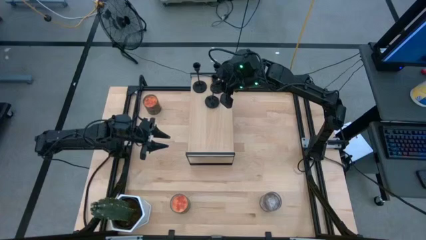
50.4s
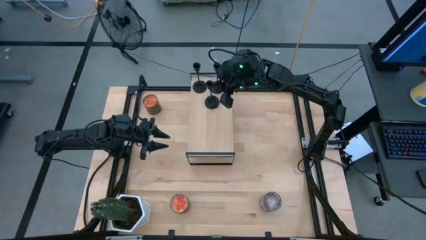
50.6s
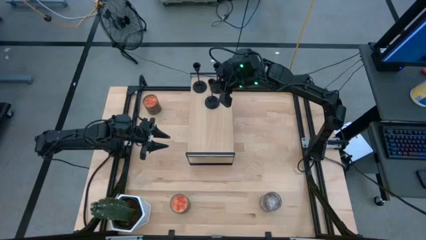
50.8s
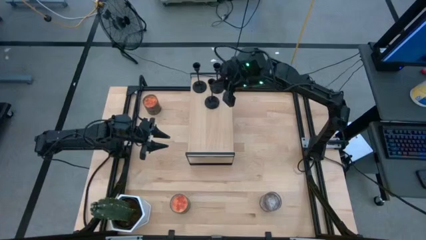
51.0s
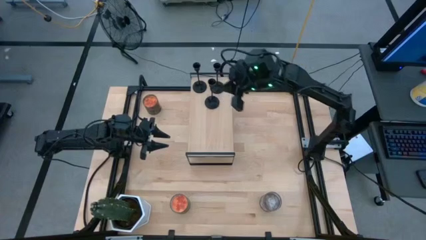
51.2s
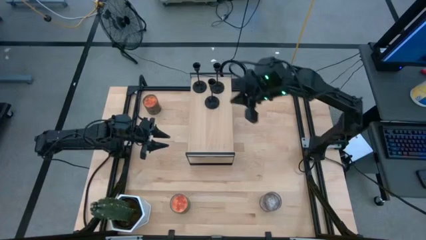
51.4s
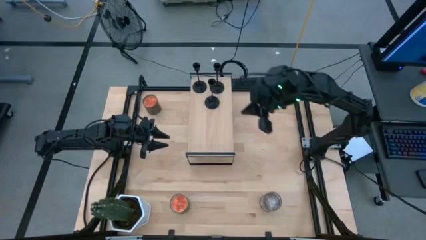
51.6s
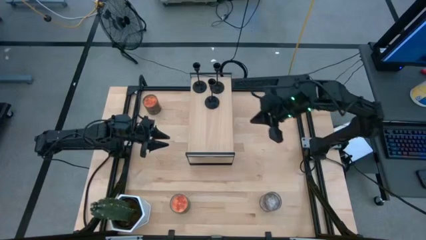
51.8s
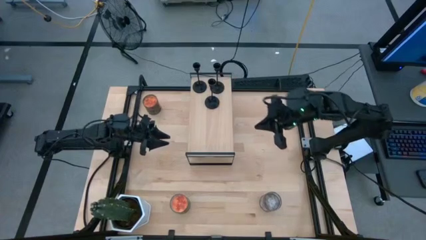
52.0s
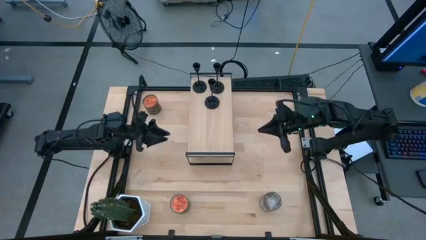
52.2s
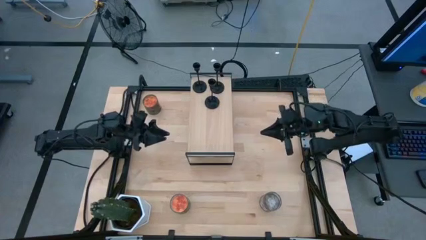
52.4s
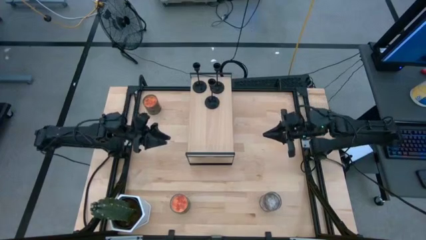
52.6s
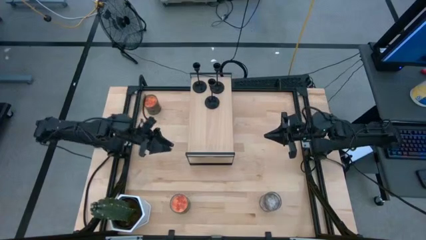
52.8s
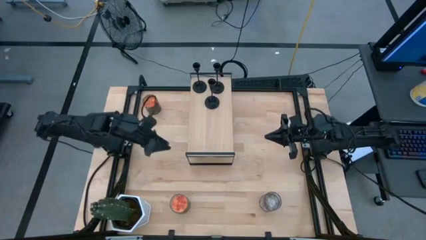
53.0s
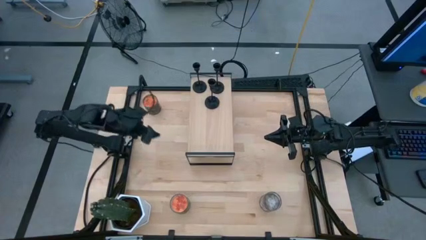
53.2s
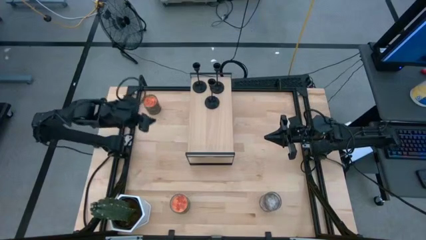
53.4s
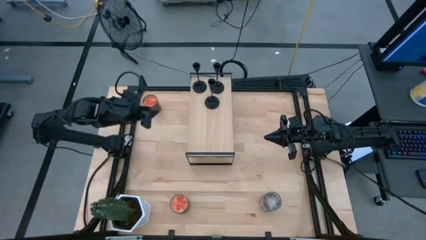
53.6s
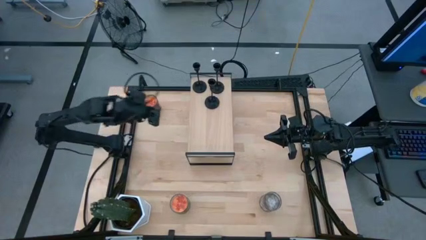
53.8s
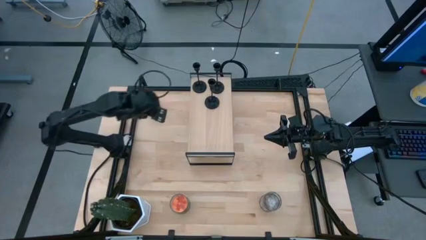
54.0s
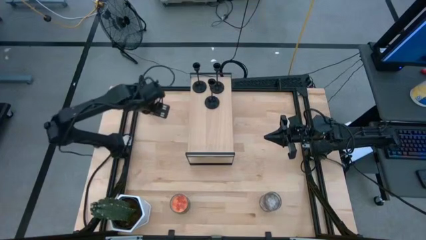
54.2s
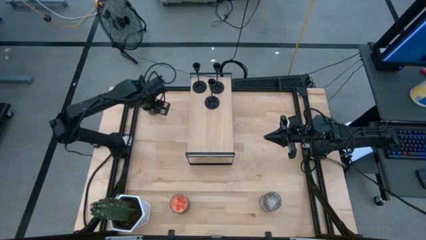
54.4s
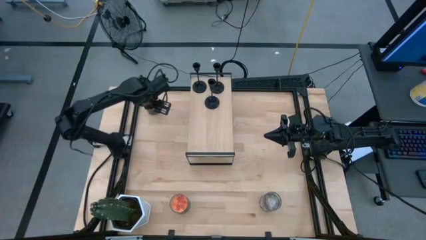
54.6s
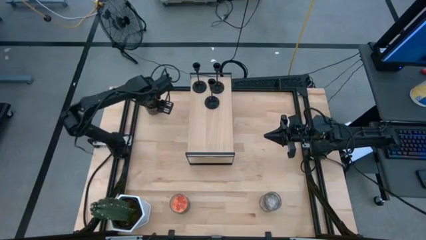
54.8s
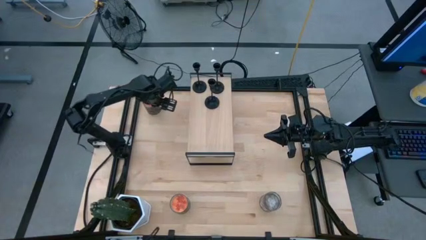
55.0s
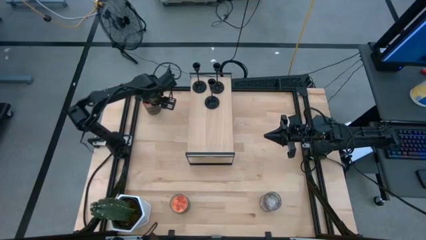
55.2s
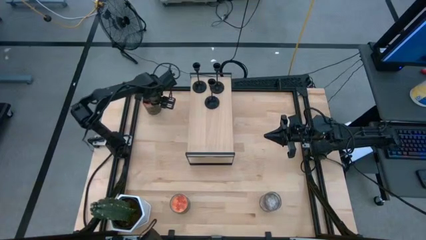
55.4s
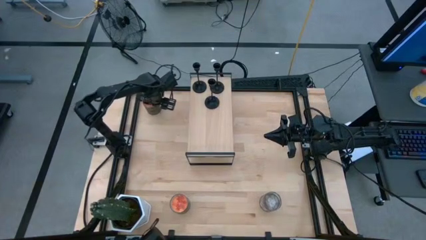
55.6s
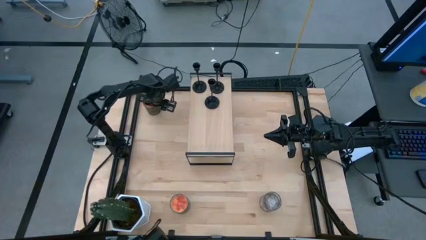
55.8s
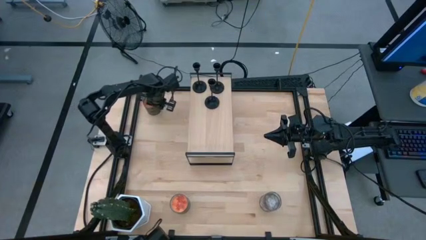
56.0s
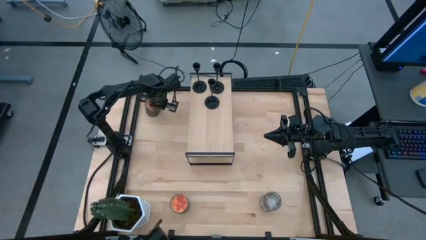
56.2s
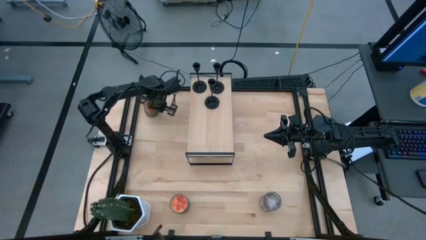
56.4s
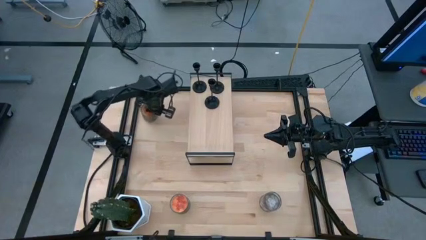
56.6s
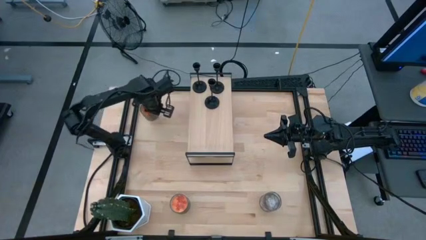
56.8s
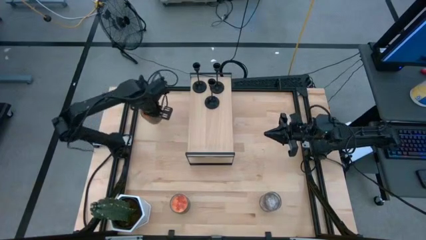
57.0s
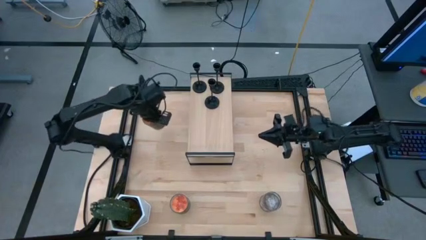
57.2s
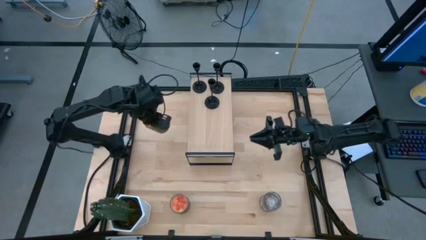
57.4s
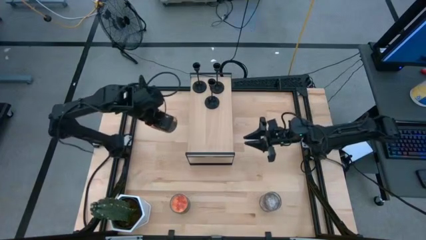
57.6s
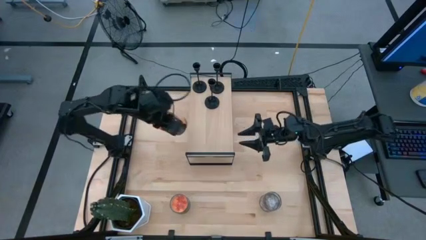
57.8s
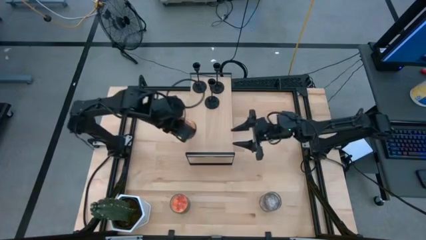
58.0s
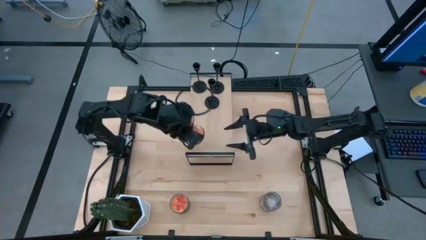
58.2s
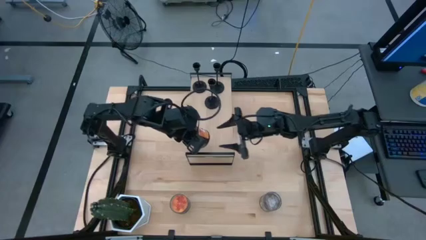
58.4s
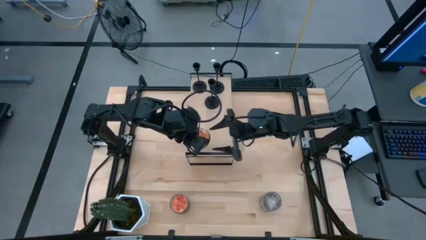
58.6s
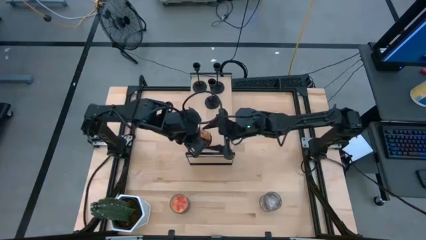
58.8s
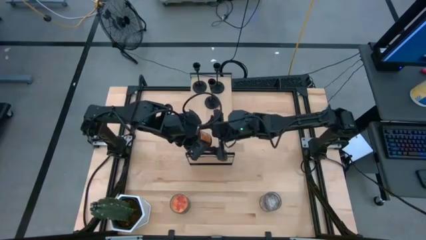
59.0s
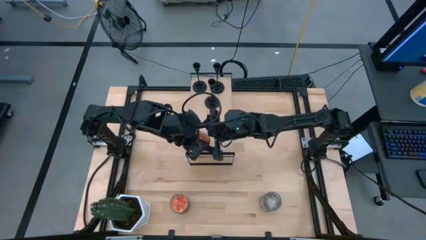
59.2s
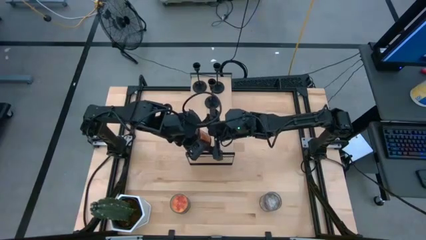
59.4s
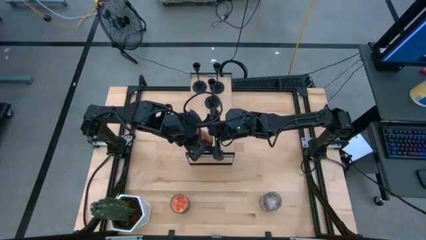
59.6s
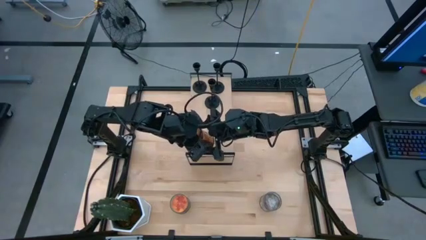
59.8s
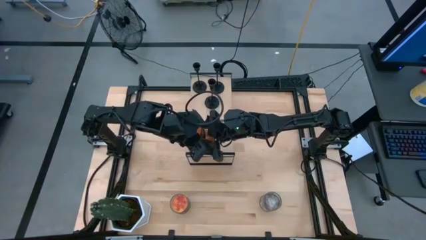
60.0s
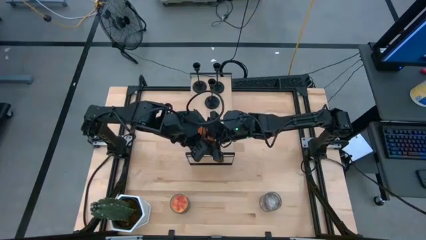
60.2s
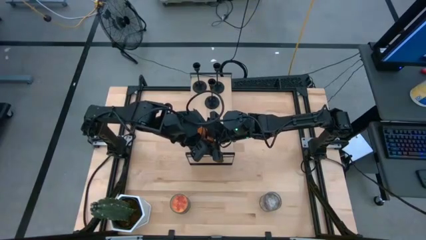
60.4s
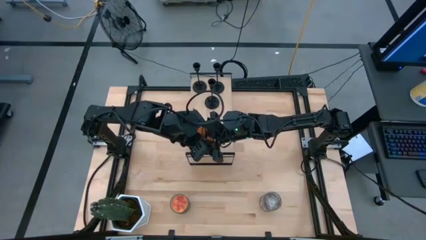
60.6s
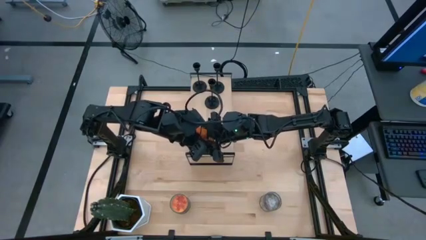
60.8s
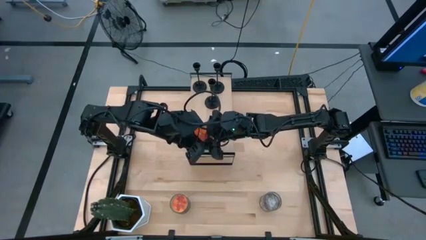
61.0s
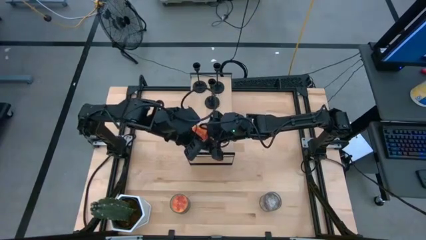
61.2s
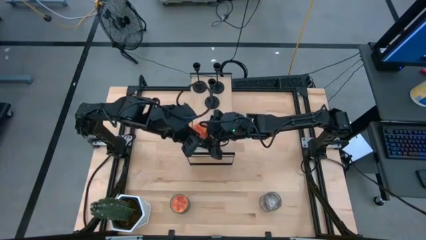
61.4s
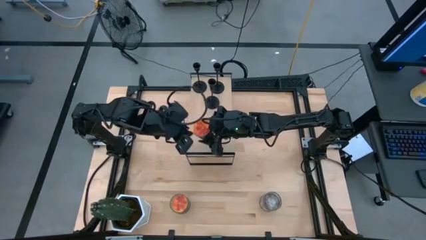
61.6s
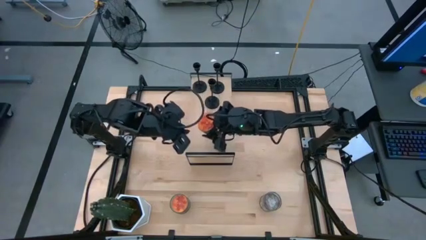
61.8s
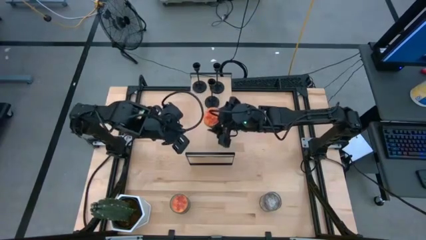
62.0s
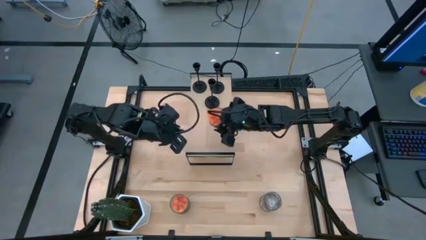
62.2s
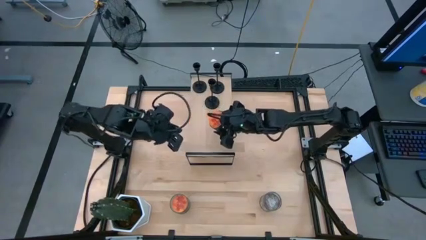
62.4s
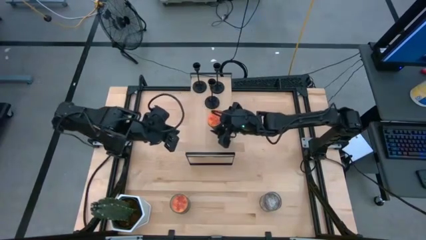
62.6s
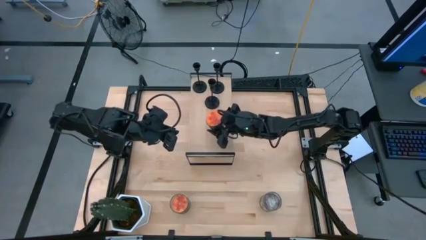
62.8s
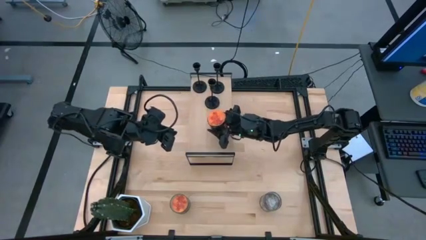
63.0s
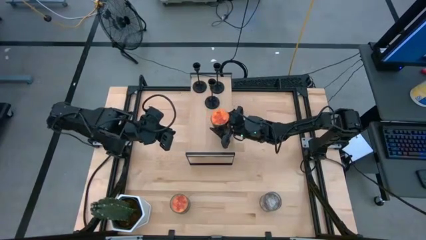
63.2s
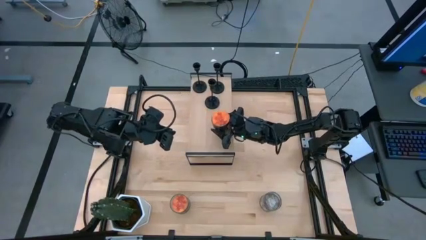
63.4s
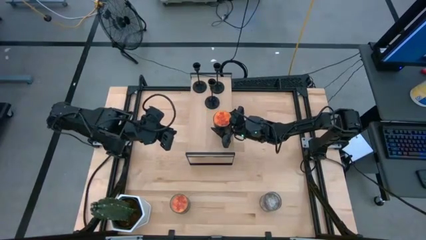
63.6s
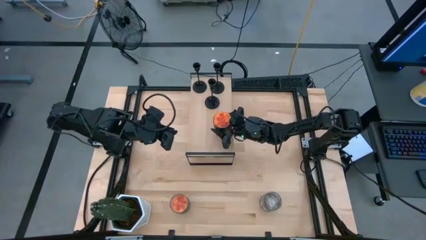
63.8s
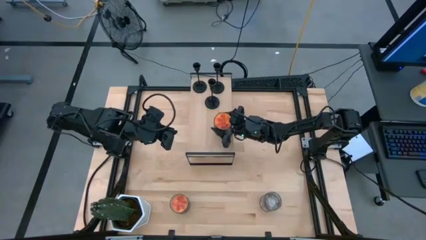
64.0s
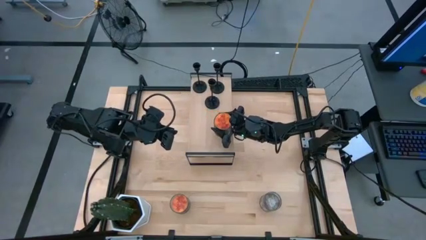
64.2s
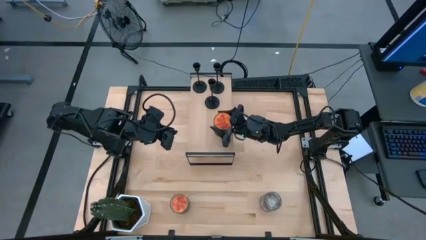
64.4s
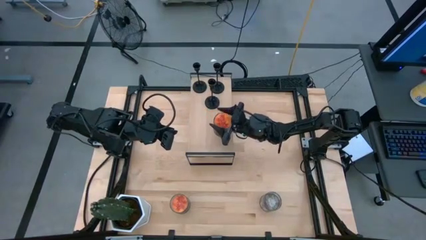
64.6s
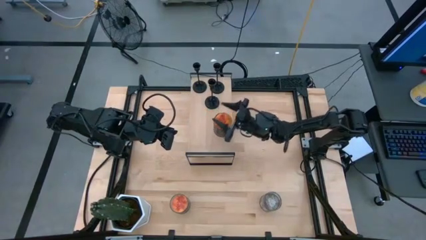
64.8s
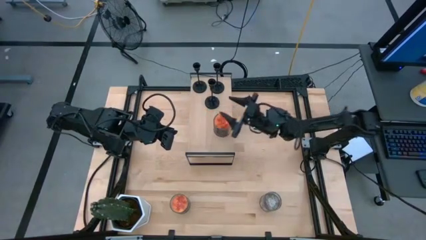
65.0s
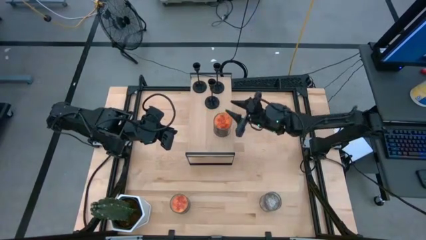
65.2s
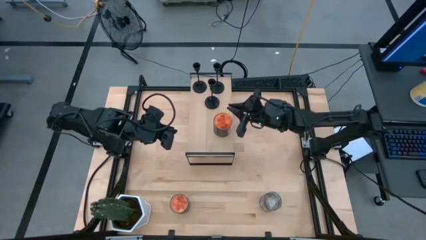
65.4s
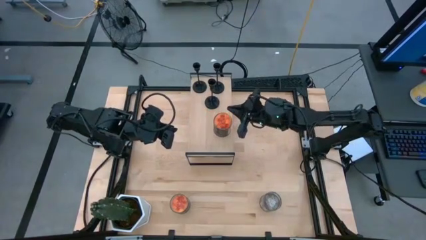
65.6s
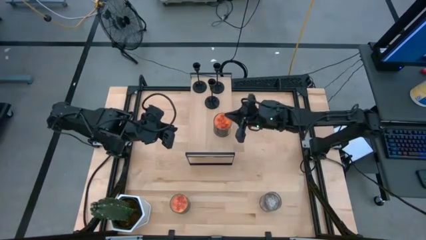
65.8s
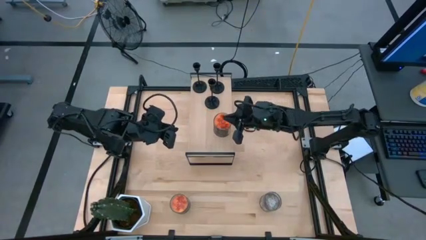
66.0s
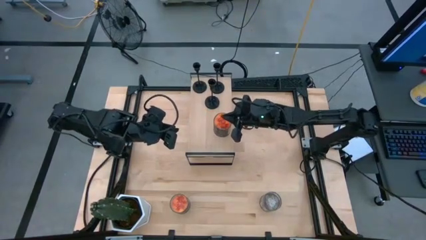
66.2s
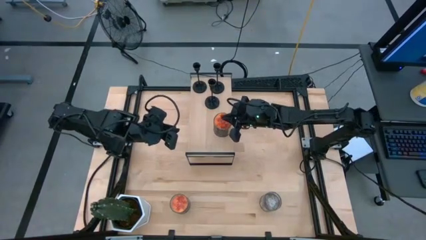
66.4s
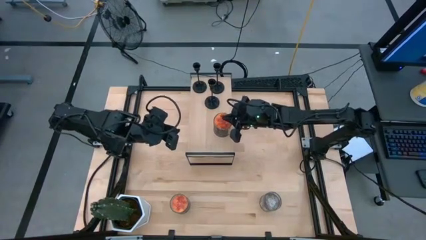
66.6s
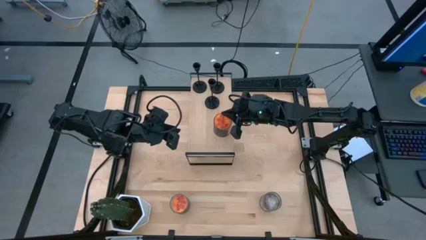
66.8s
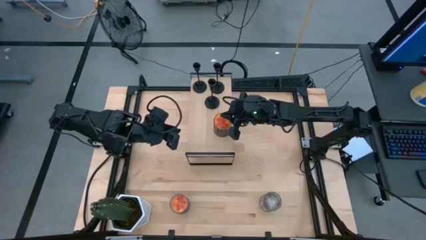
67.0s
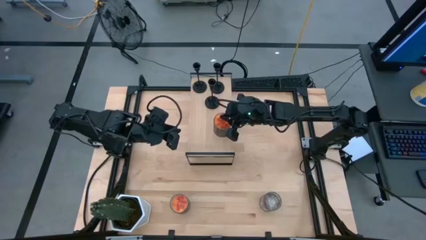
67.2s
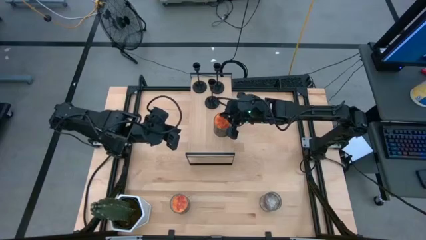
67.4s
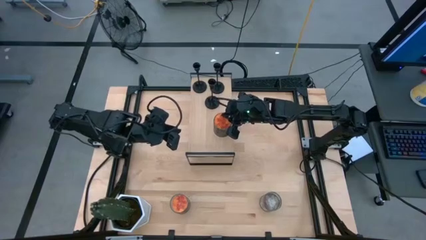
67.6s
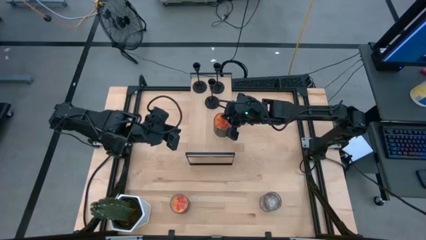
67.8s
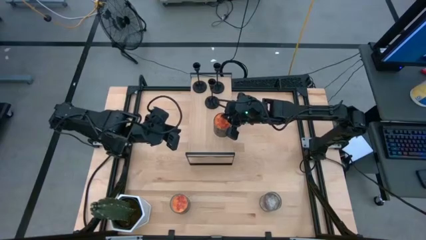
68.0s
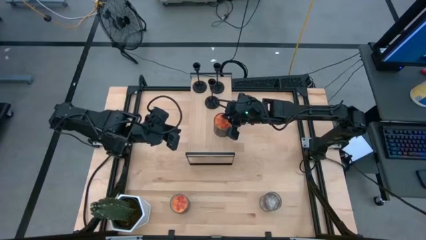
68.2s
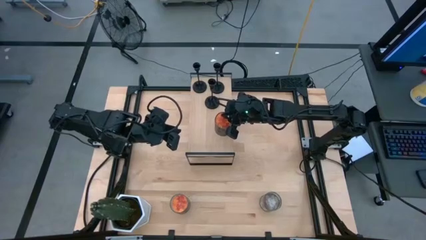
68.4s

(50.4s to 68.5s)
Task: Pick & Place candle stick holders
Put the top orange scented candle on the shelf
